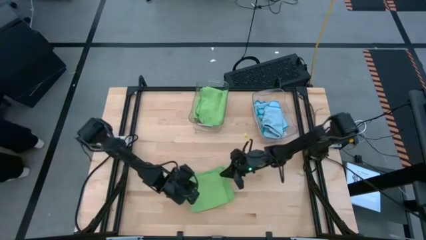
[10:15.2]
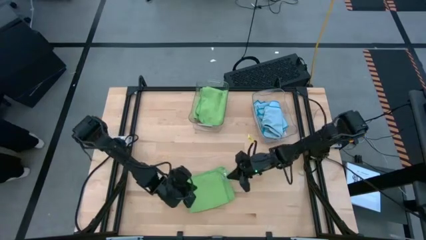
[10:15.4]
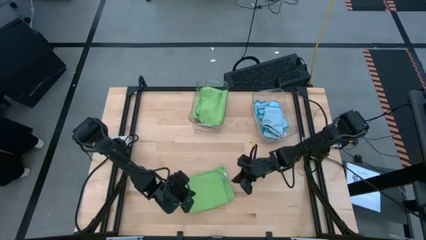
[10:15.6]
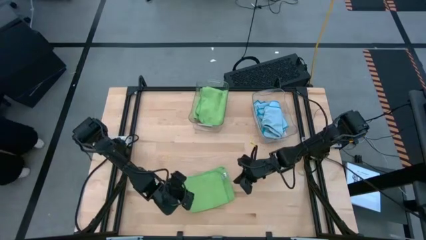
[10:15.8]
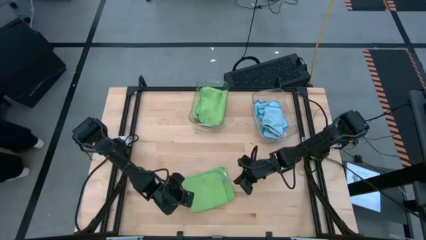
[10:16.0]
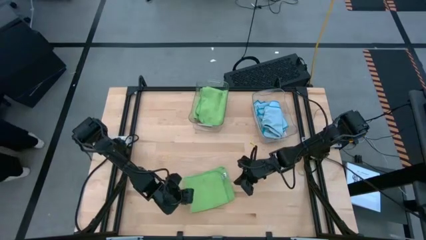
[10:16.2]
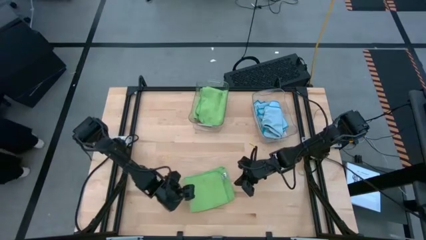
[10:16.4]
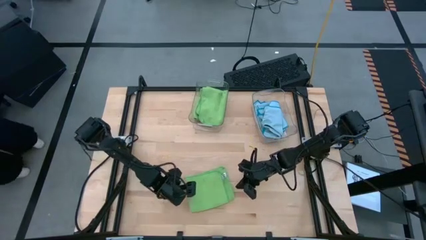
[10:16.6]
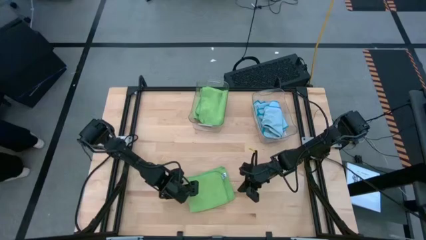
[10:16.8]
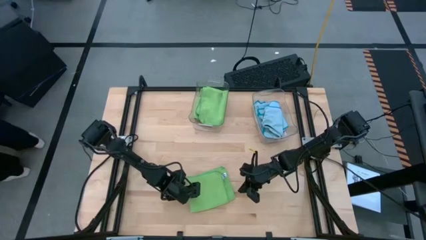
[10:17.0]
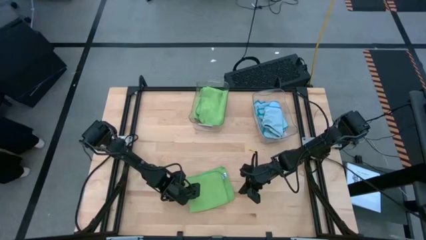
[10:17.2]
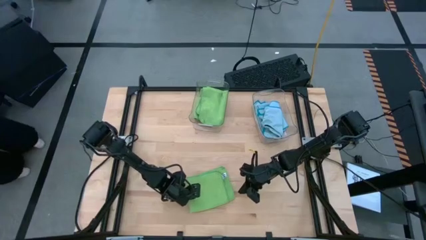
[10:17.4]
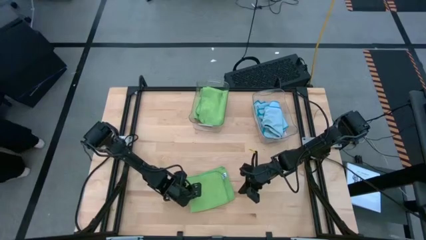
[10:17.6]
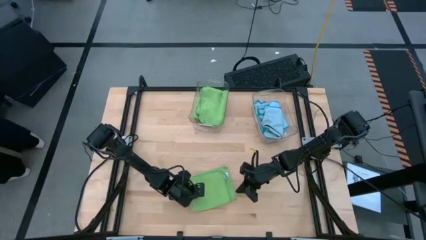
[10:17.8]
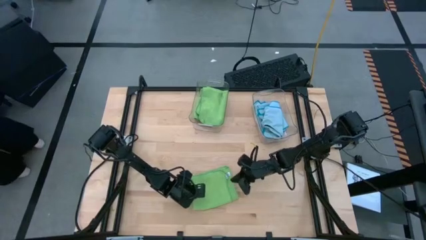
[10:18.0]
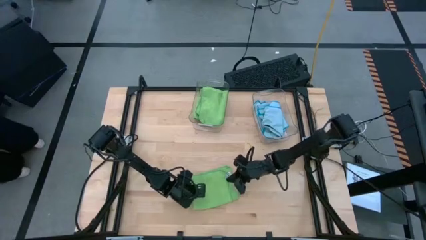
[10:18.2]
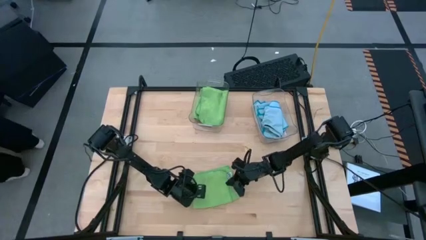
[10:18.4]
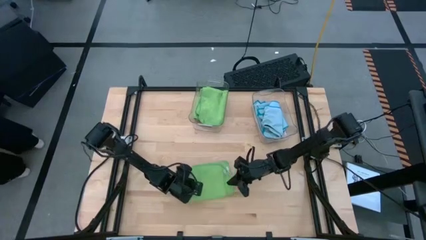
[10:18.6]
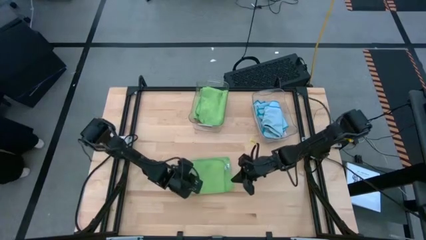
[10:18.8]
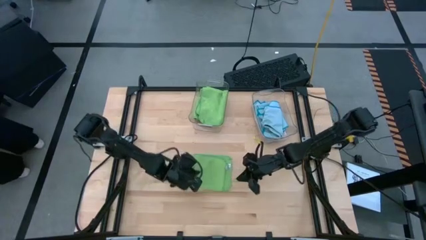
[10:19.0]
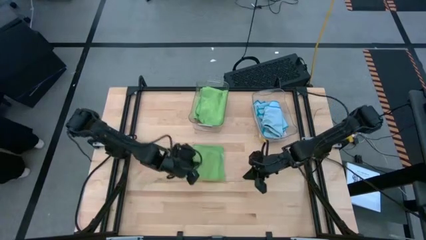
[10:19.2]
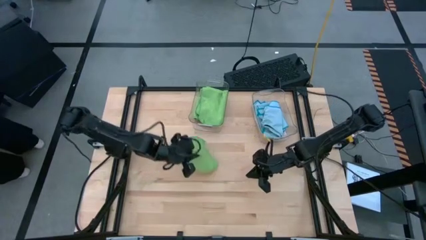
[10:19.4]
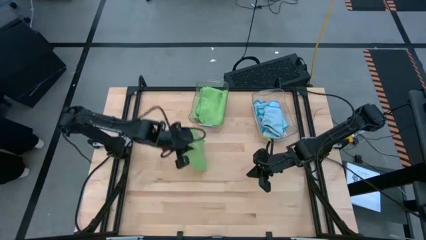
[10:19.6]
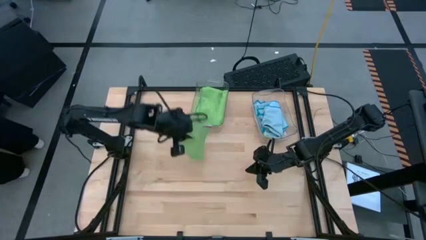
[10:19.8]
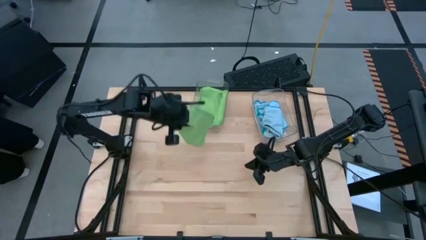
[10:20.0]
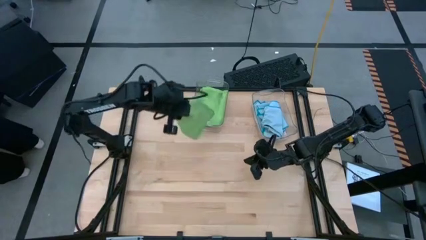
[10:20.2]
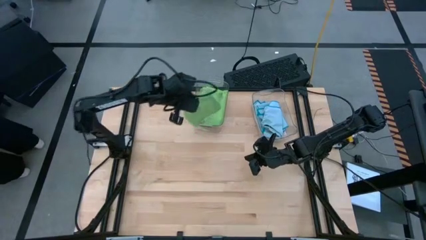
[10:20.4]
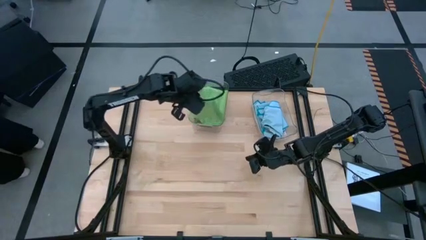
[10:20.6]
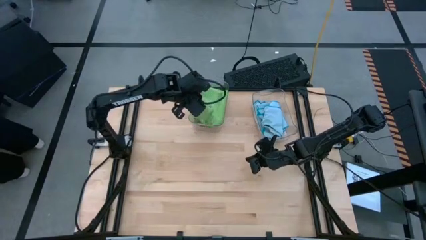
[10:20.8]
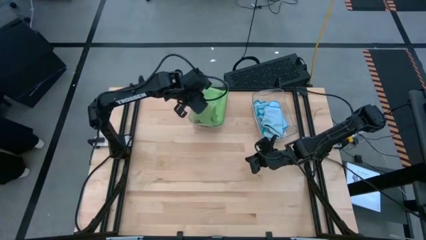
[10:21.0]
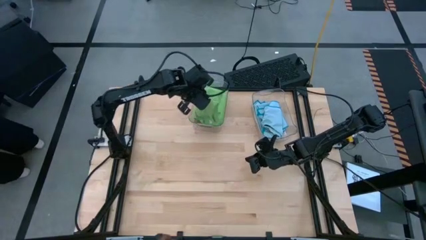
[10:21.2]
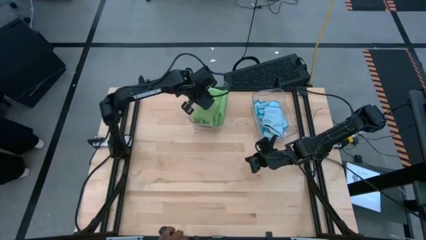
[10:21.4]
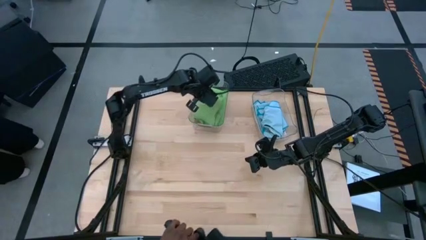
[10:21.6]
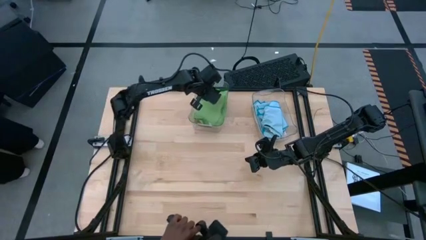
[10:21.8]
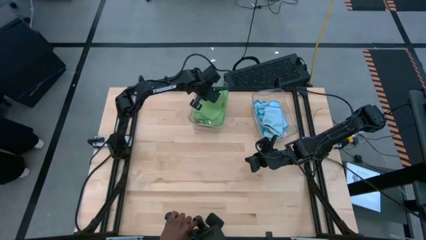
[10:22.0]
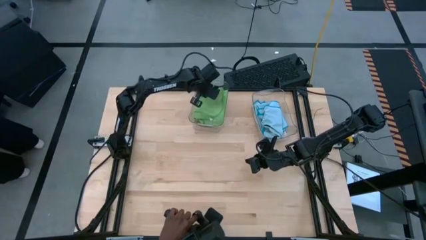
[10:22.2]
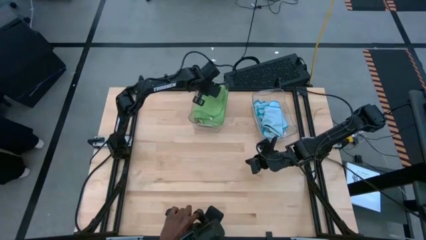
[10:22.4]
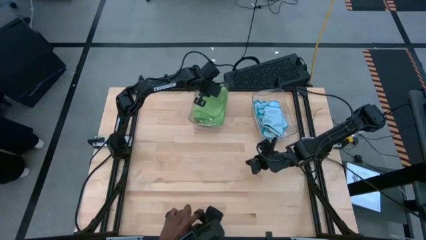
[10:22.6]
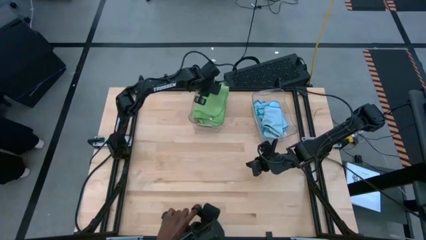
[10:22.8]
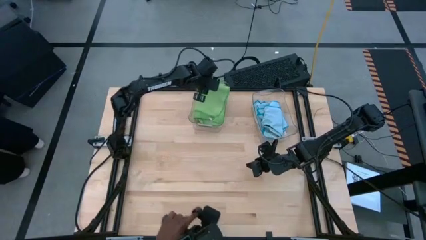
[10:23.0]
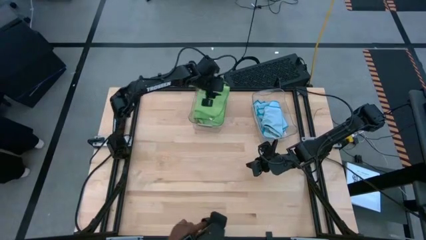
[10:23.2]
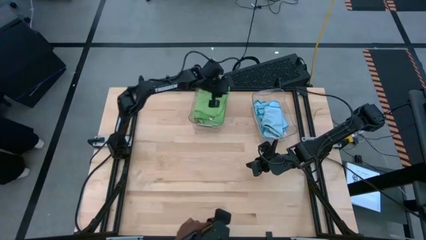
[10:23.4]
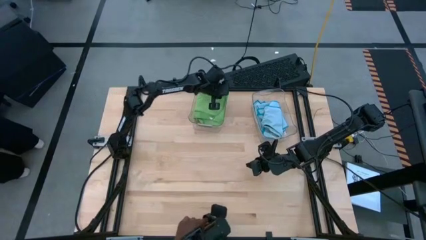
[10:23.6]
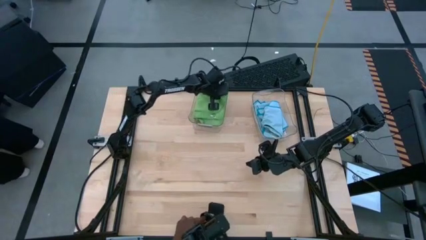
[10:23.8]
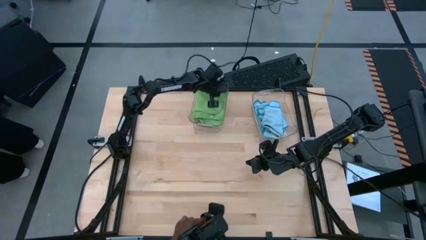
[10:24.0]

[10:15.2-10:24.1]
Task: Fold microfiber towels
Put the green microfiber towel into the left transparent bin

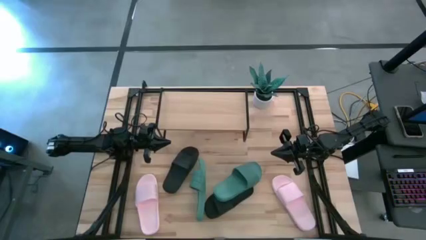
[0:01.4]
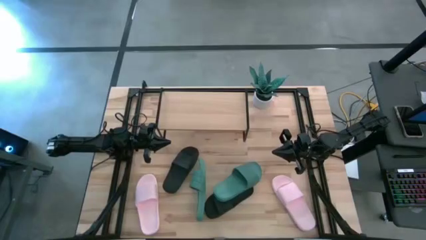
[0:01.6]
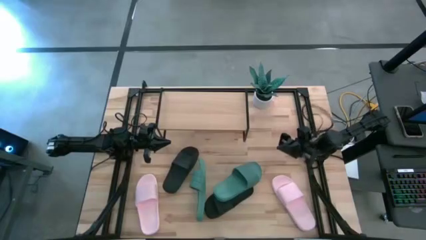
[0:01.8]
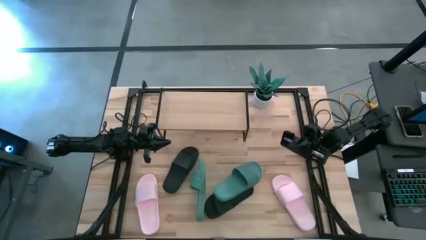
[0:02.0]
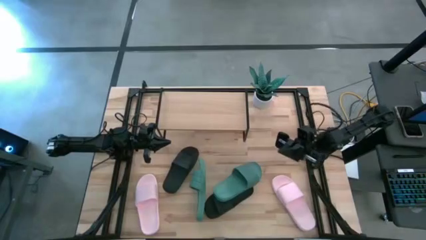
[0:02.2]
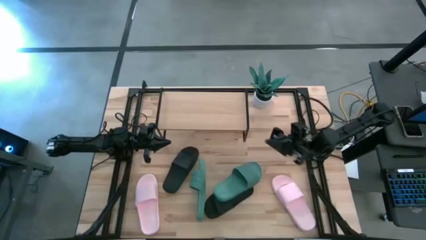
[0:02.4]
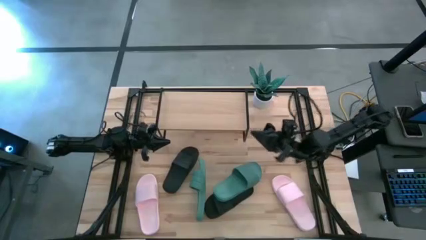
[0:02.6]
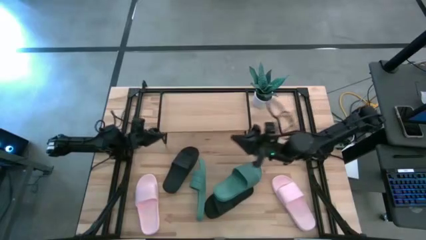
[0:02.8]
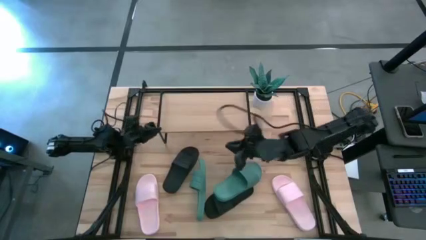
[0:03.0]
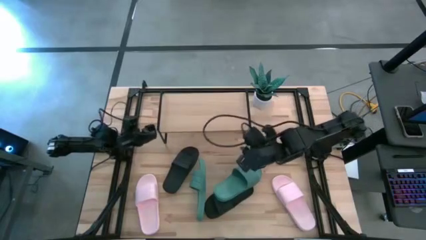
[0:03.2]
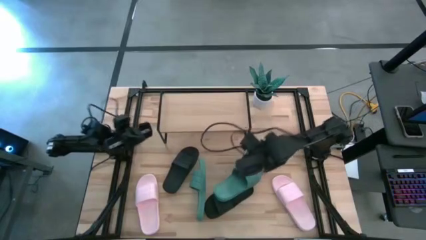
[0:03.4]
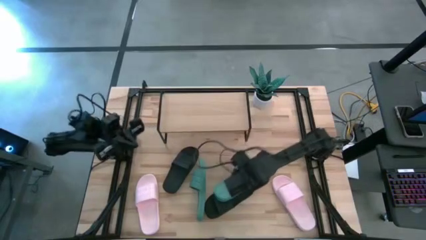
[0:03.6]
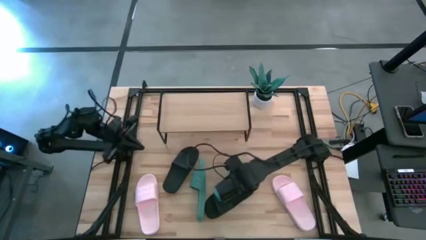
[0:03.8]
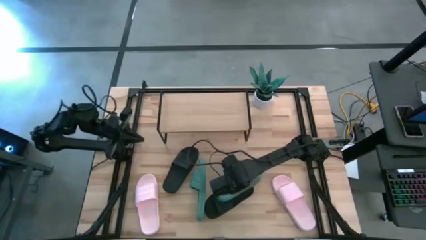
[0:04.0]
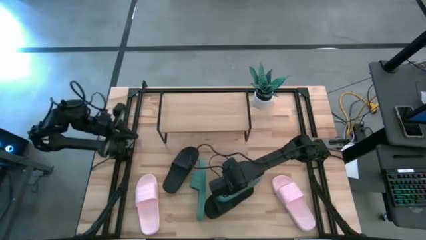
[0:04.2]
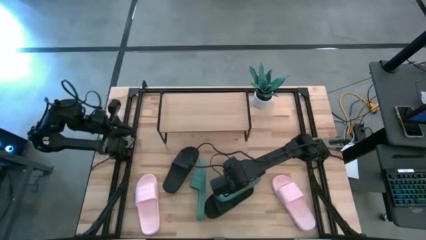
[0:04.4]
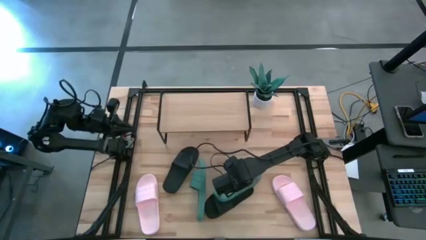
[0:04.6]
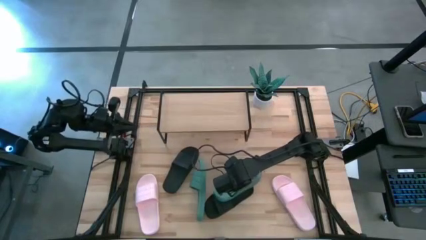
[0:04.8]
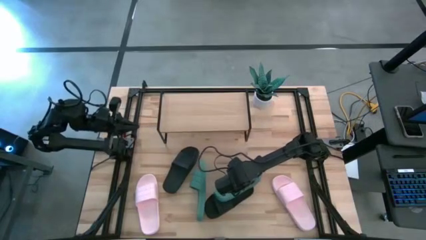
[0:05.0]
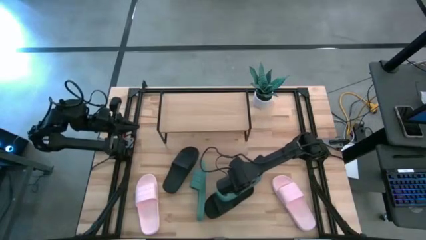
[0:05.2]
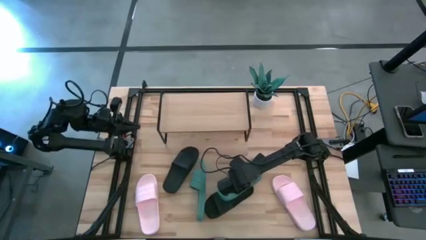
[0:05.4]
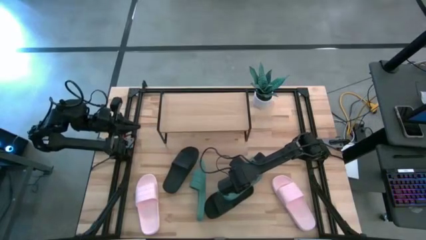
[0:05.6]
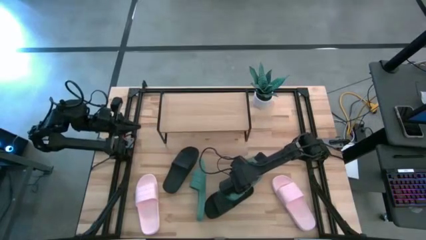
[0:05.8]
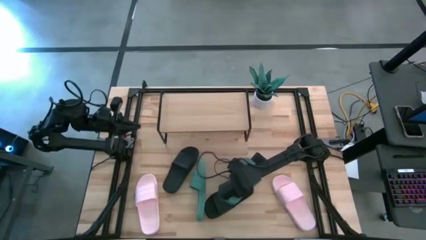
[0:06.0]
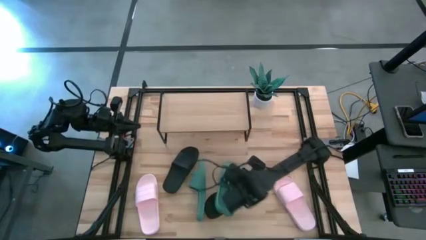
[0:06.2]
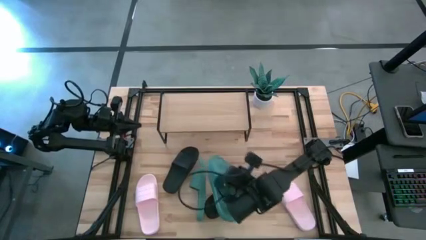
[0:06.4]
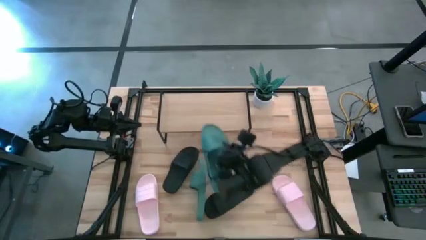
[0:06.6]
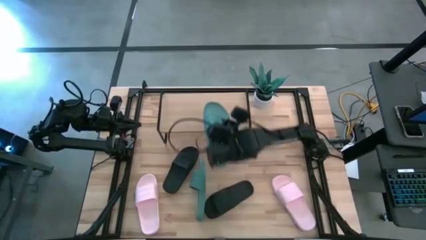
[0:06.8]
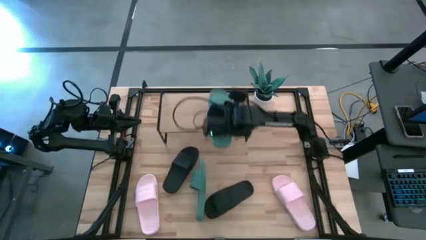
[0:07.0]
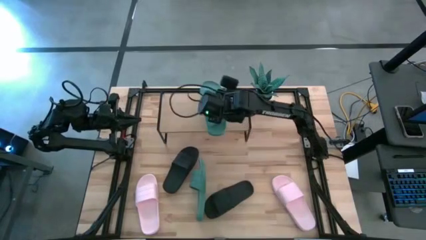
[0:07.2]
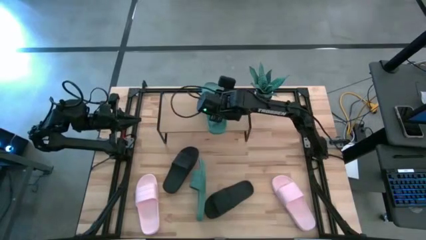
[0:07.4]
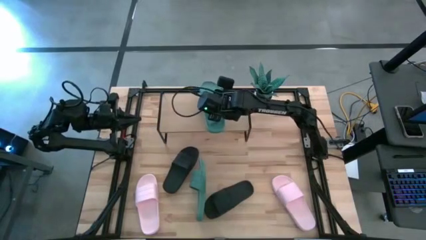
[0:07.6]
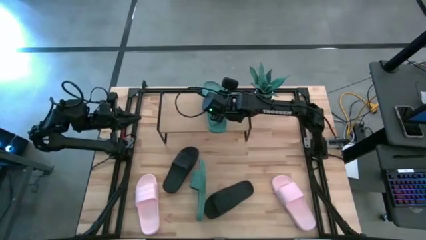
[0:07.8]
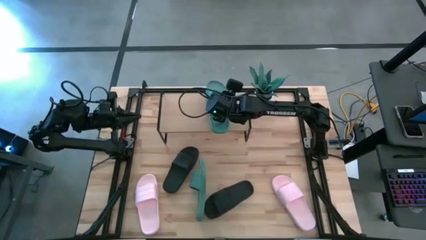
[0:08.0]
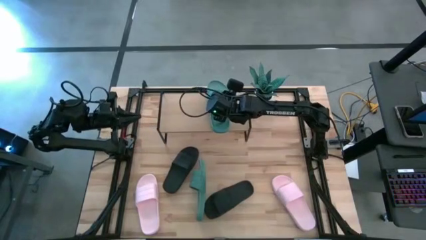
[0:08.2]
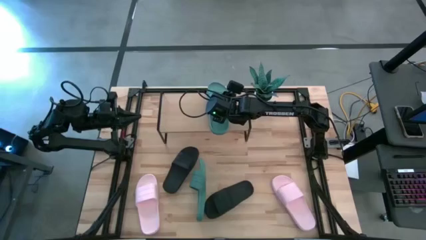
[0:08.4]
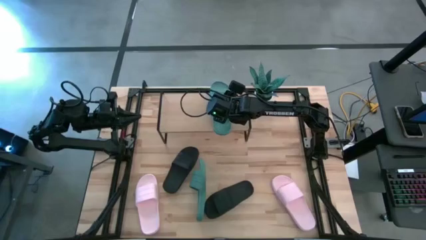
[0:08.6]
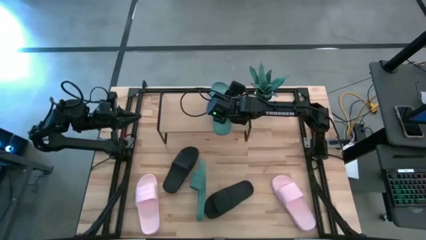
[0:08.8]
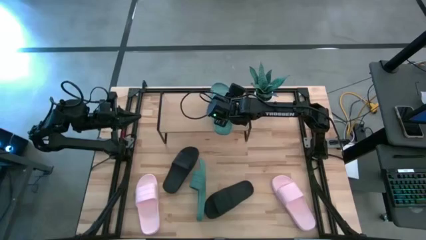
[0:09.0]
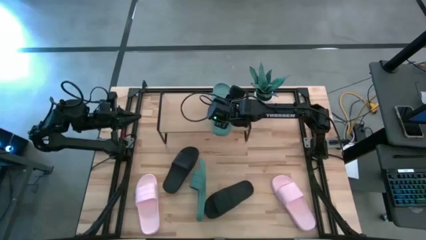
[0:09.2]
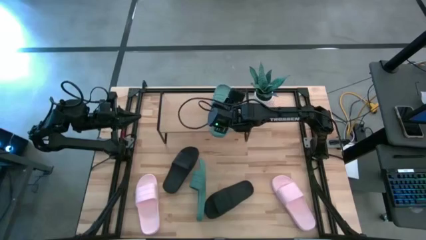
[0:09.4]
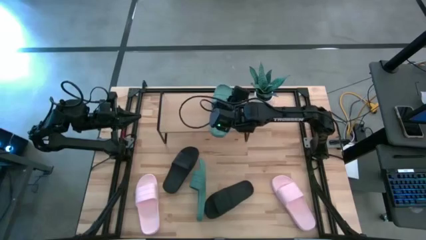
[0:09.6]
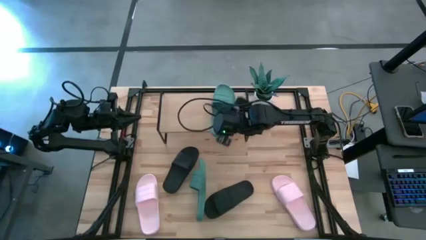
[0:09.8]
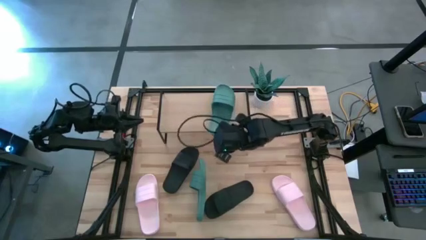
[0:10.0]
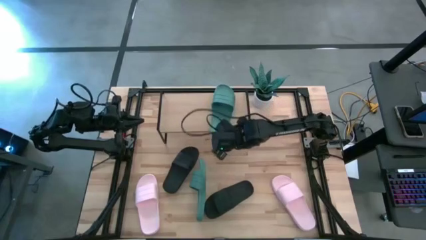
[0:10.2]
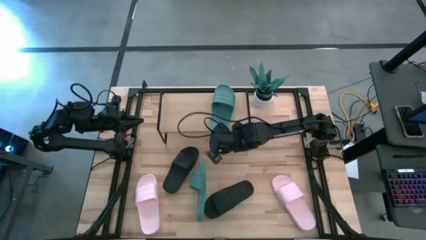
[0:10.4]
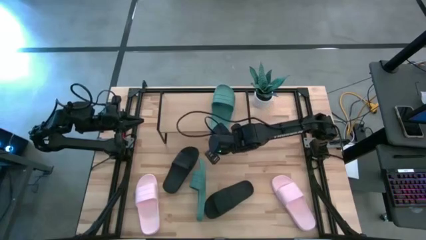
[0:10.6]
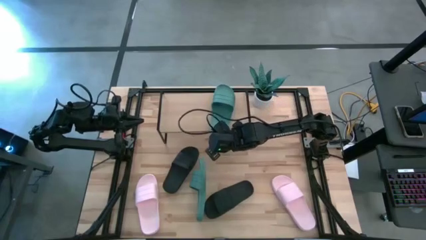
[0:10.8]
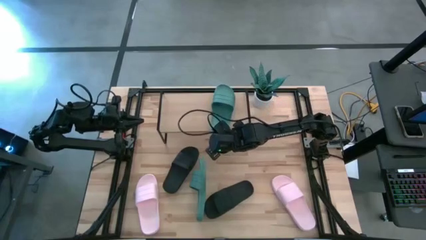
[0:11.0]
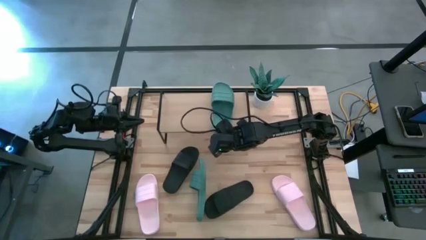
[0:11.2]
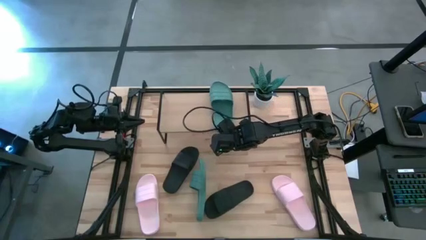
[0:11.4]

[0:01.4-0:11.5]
Task: Pick and place slides into the shelf
Put the right green slide on the shelf
